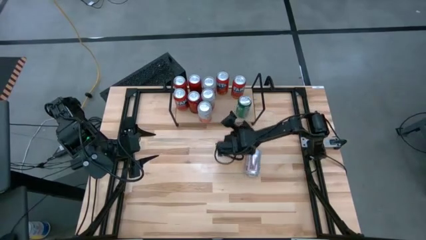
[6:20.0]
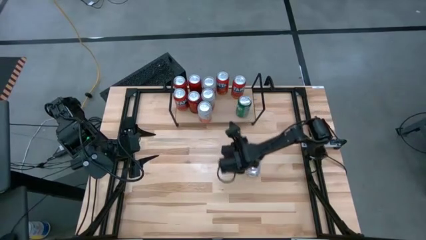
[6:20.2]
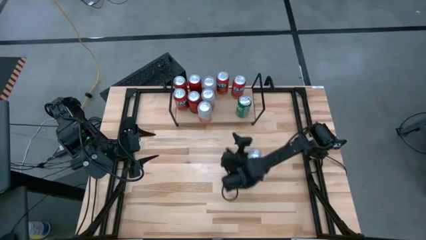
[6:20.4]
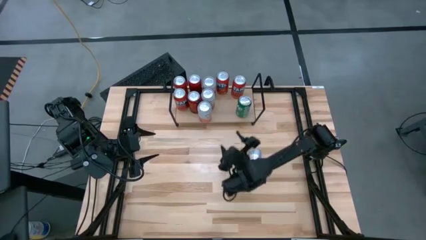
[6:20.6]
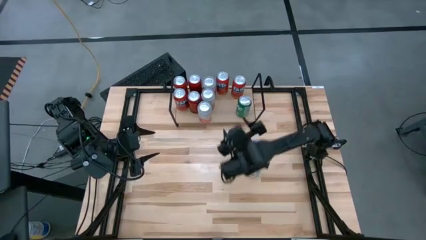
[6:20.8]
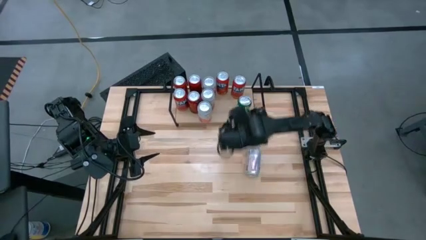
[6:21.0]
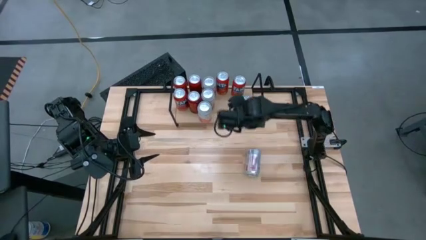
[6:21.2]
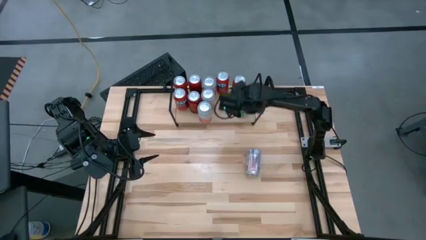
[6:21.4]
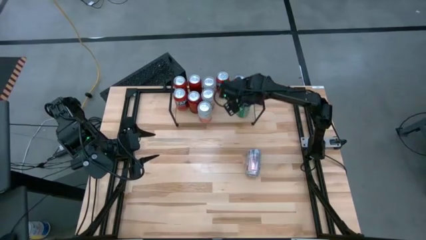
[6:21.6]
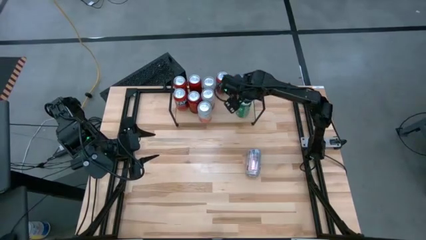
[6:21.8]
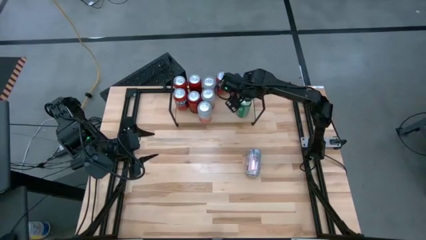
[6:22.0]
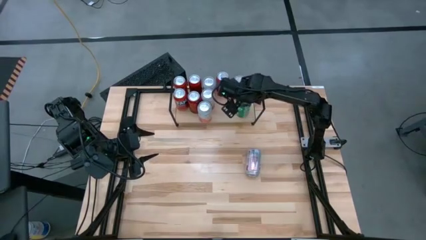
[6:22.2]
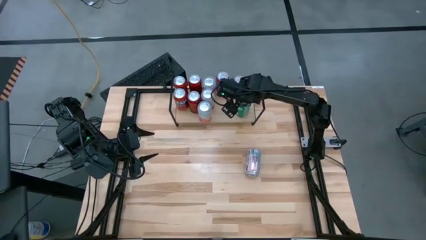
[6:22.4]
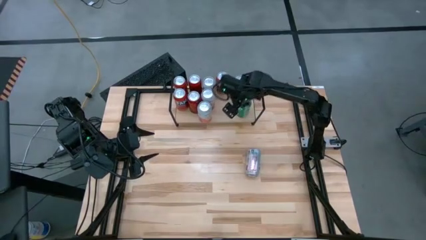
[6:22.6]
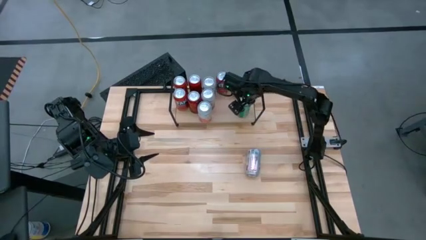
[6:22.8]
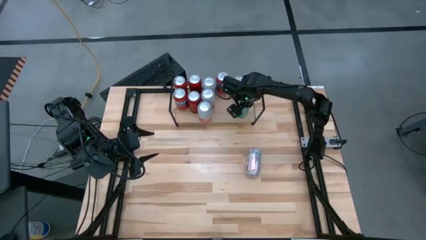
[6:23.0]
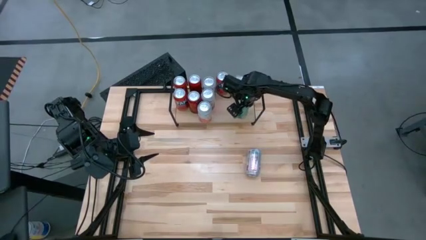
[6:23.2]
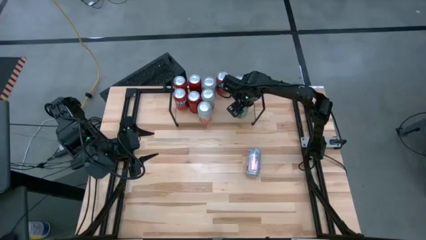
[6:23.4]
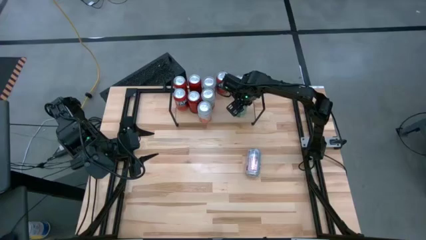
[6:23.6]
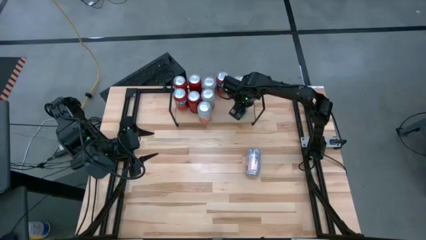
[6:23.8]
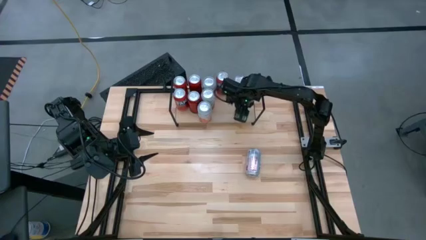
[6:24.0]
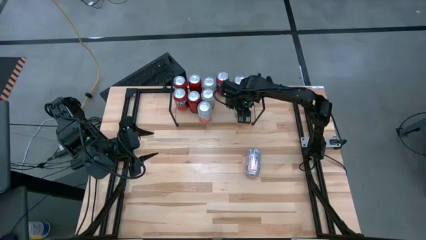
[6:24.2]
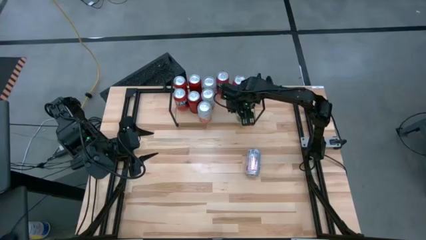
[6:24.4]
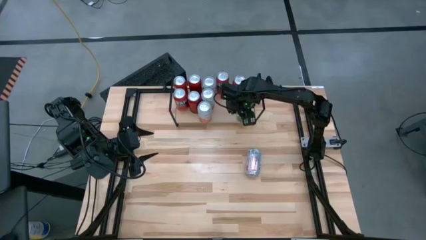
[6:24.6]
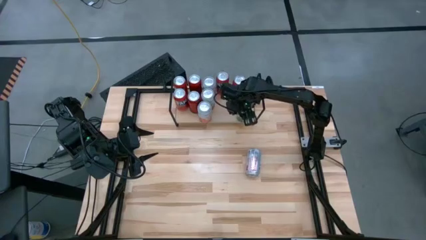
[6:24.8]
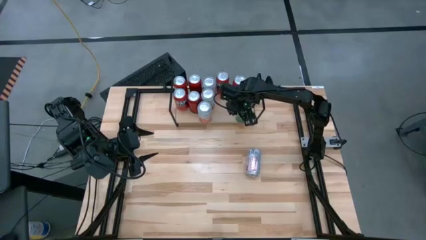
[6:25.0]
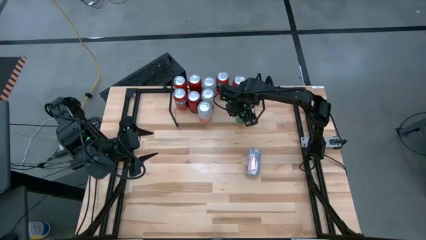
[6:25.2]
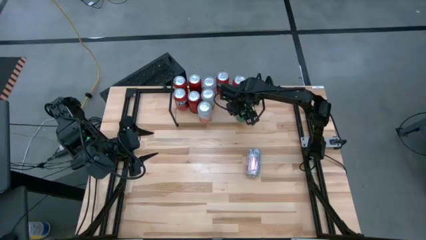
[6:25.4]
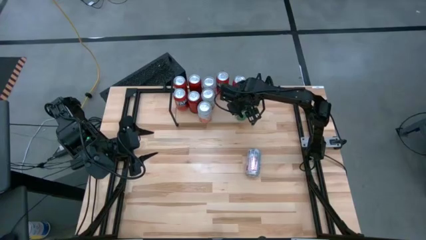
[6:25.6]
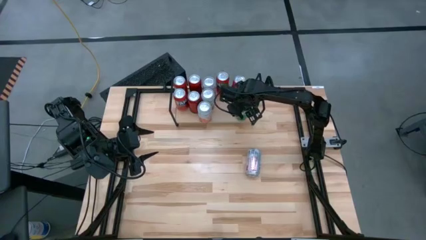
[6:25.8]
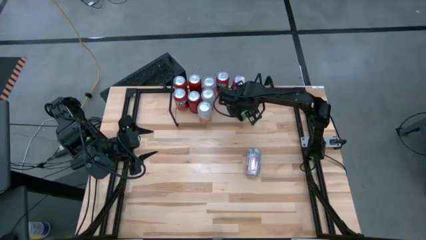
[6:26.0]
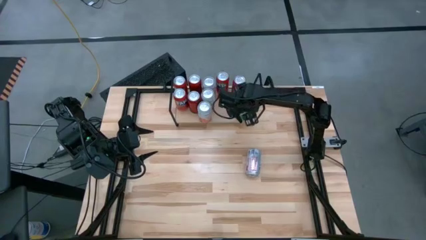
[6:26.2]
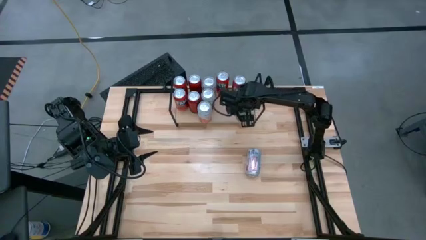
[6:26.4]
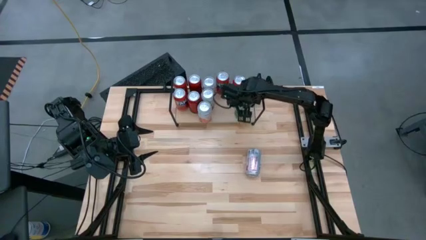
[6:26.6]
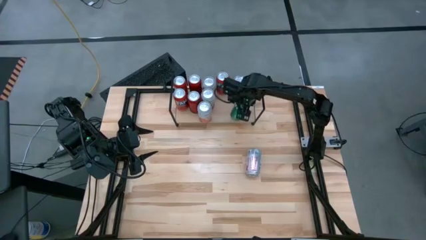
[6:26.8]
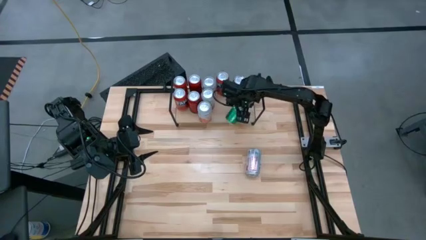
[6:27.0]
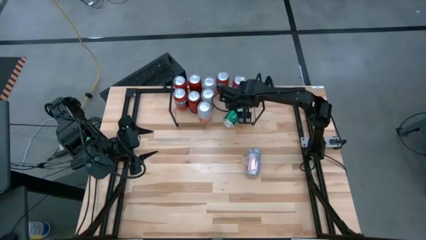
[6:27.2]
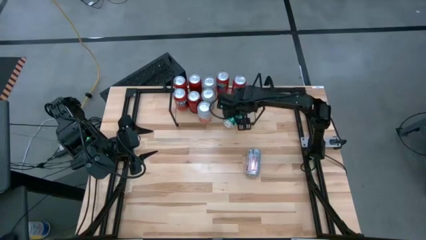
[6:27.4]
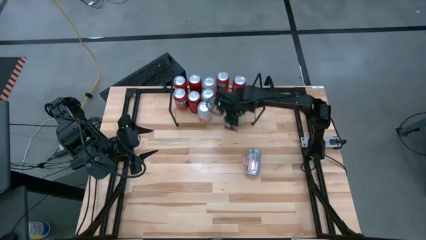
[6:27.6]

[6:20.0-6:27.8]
Task: Place canned beverage on shelf
Put the green soda can on the shelf

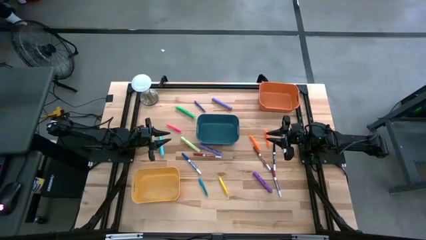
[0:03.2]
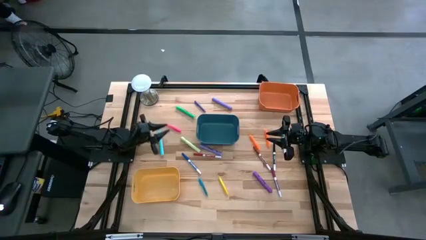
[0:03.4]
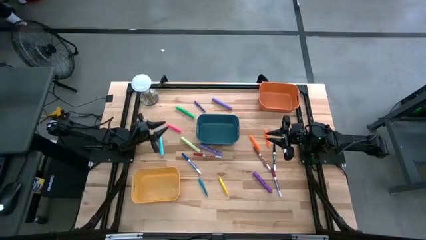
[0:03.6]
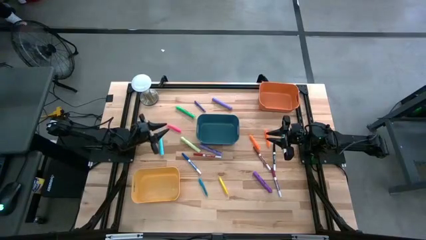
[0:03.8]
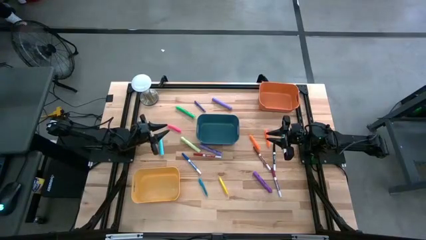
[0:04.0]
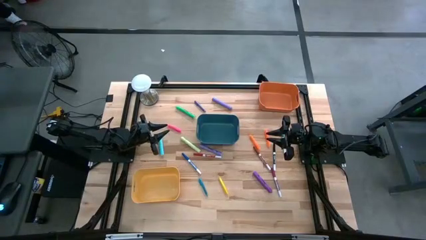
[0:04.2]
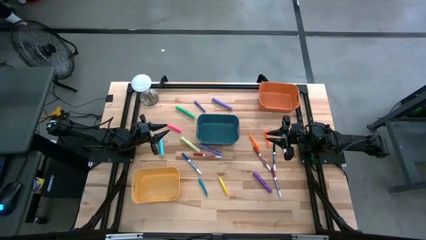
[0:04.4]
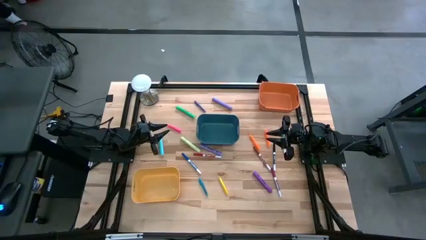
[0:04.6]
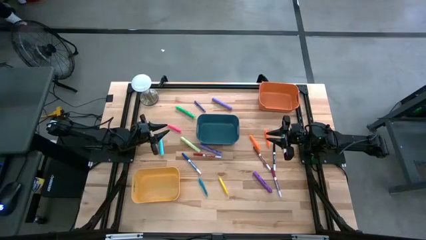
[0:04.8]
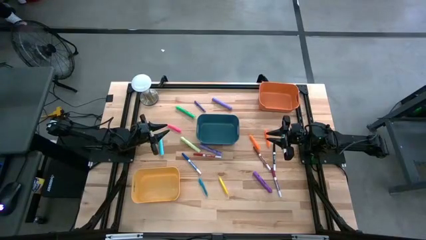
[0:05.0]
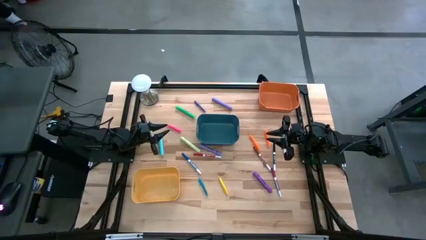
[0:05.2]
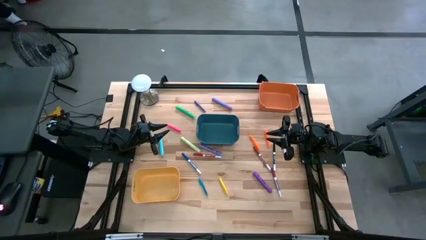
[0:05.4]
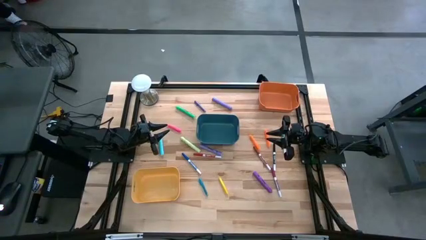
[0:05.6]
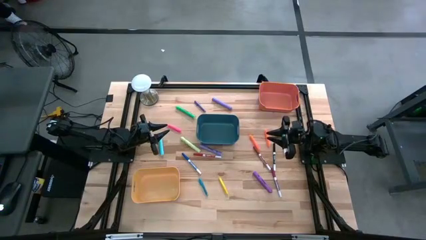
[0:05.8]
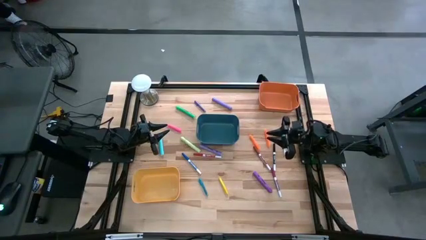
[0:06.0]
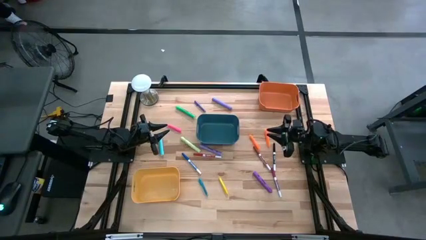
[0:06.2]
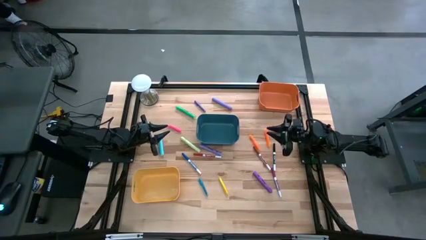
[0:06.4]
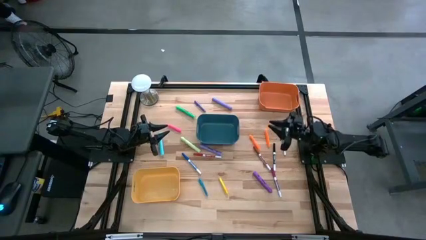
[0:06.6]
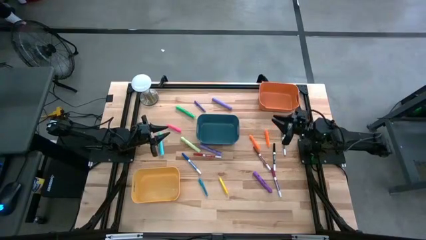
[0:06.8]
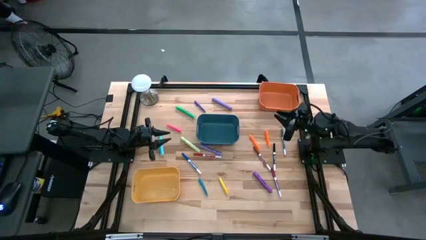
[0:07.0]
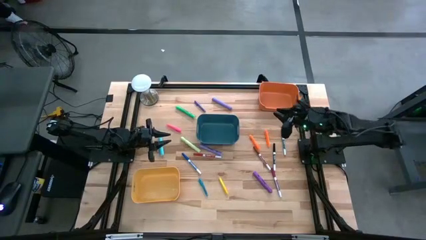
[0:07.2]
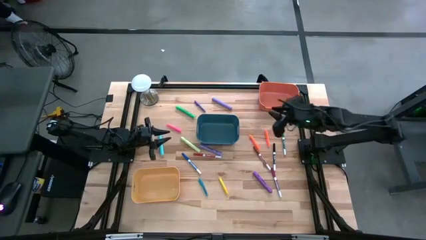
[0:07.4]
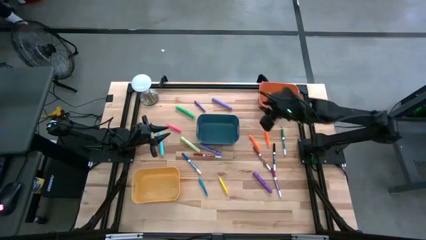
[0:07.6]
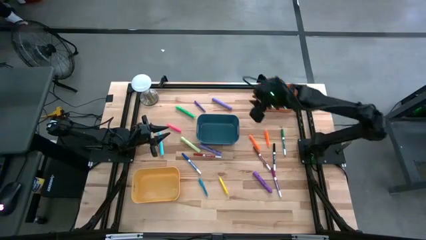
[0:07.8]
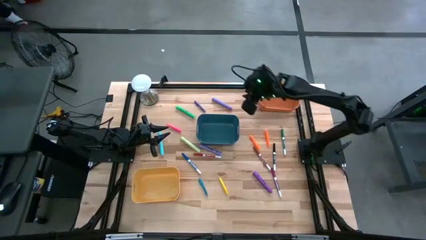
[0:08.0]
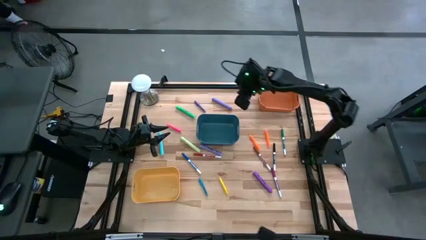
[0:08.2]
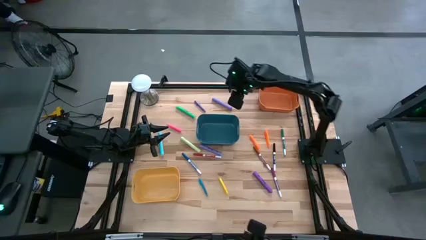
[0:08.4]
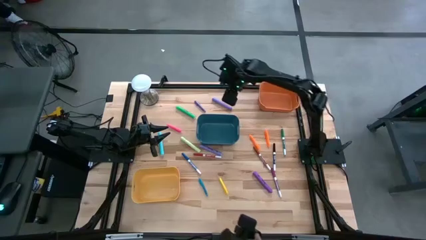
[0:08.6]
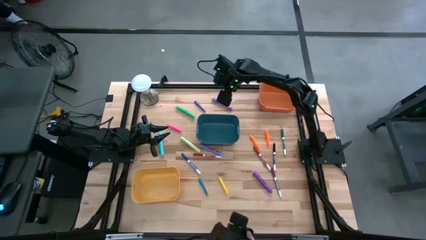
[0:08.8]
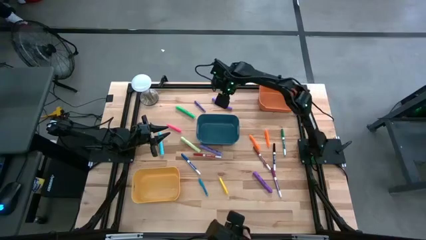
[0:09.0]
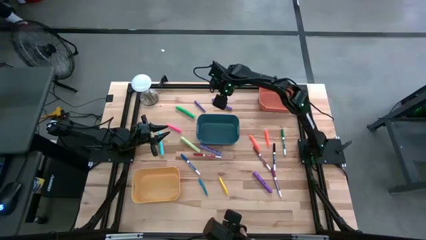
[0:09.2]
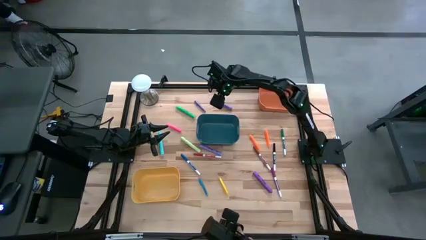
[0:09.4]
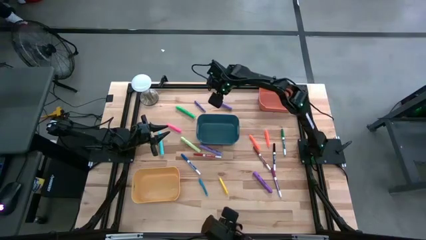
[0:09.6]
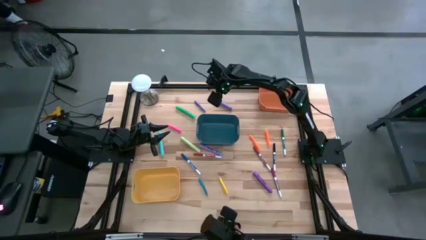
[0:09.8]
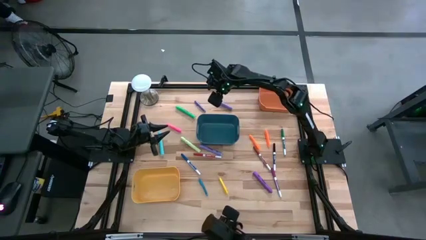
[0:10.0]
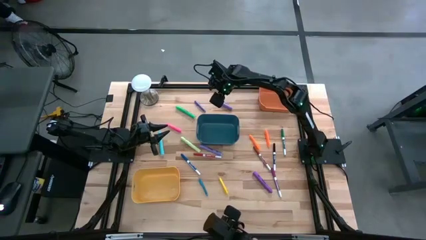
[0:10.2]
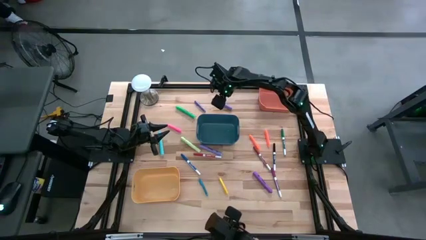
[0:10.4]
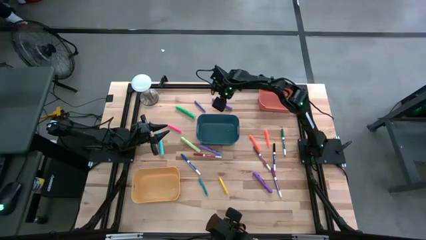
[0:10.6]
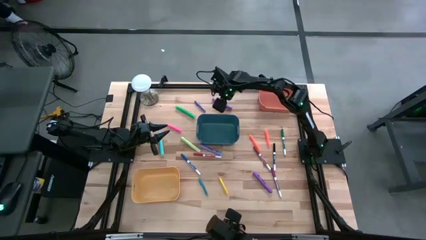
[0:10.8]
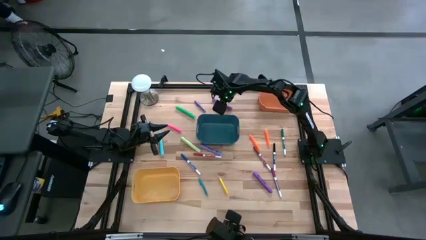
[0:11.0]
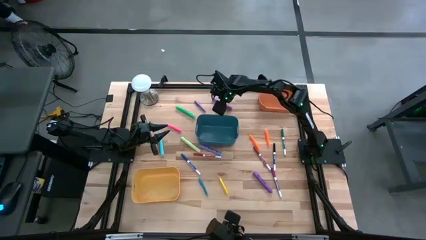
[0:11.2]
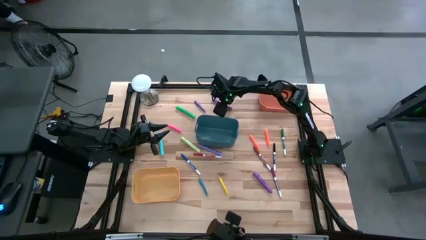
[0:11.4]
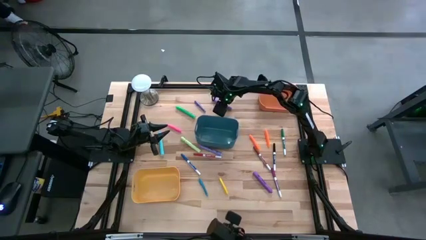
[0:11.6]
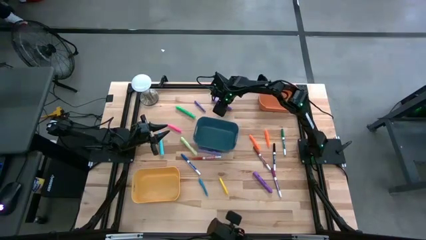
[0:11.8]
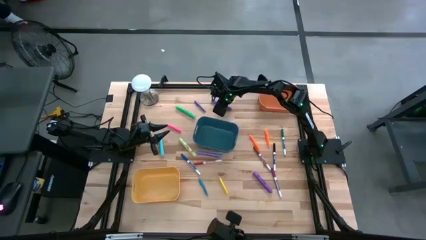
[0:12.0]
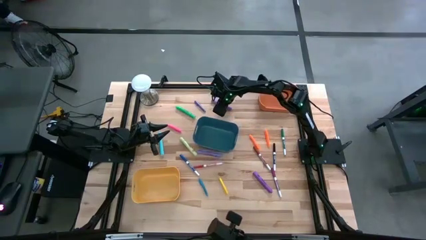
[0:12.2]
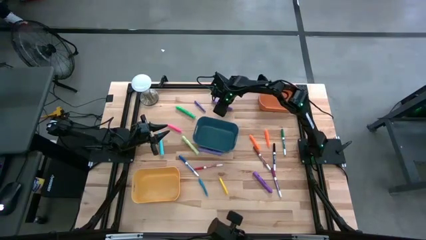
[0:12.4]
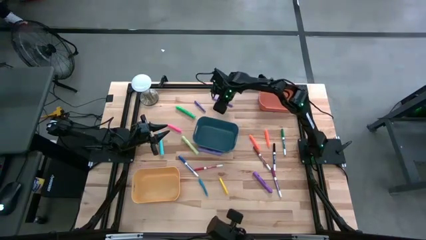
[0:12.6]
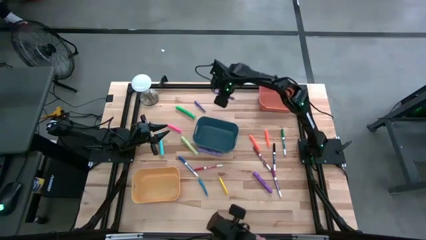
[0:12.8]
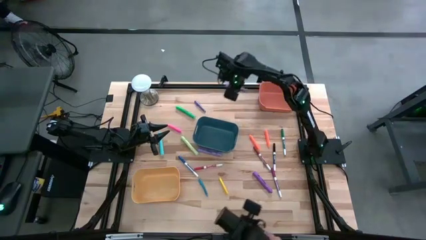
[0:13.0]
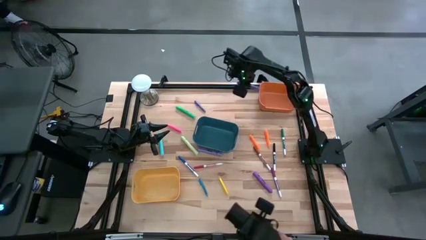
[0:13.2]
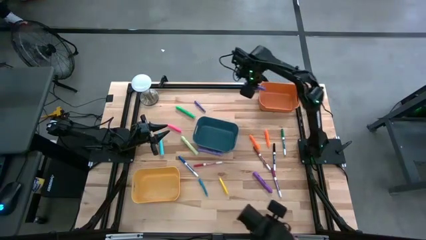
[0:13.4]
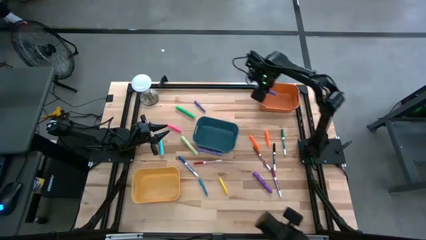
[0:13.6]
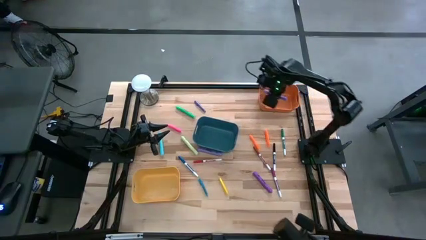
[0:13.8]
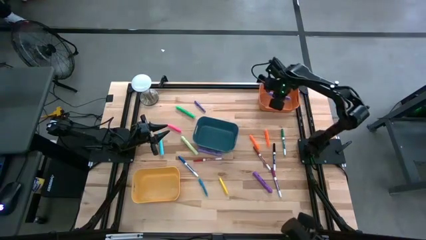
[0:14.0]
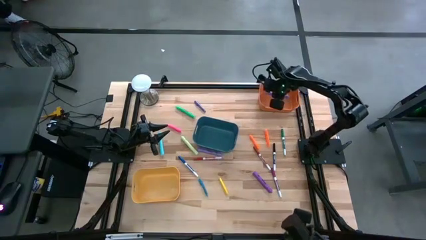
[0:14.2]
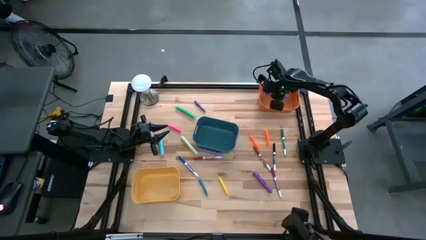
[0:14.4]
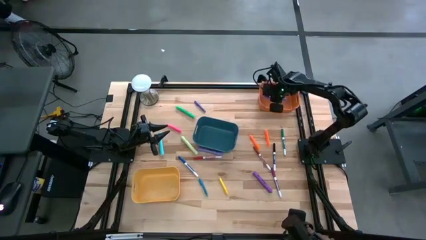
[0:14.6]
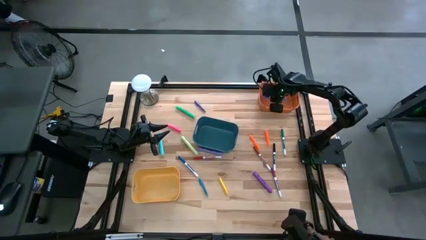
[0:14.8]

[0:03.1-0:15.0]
Task: Pick & Place Markers
Put the top right light violet highlighter pen into the orange bin
